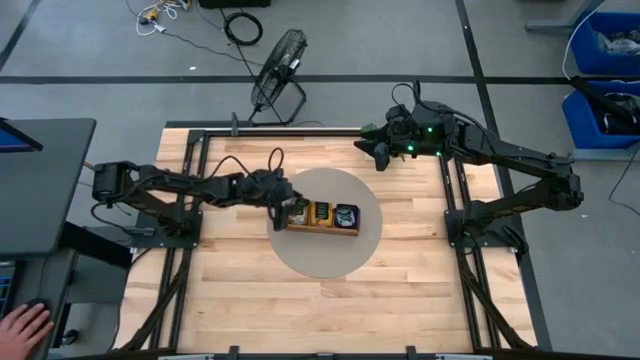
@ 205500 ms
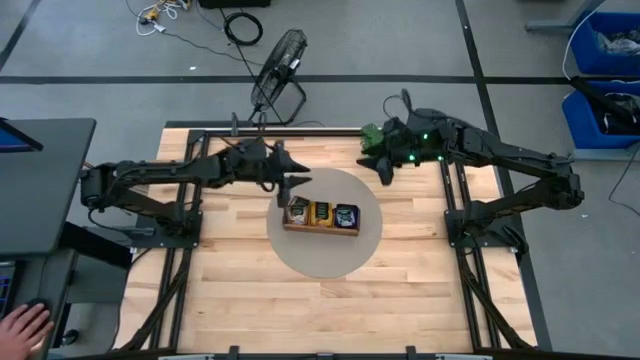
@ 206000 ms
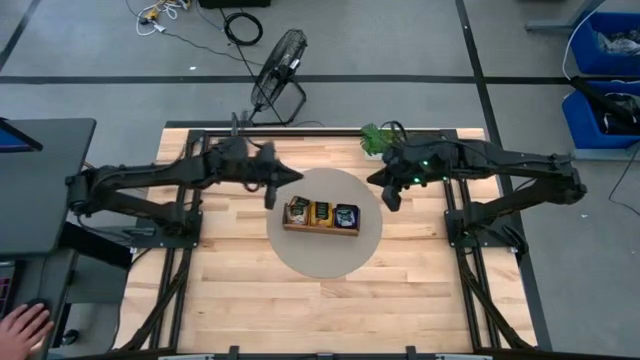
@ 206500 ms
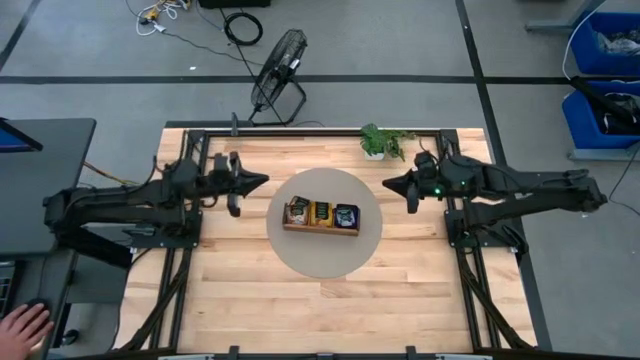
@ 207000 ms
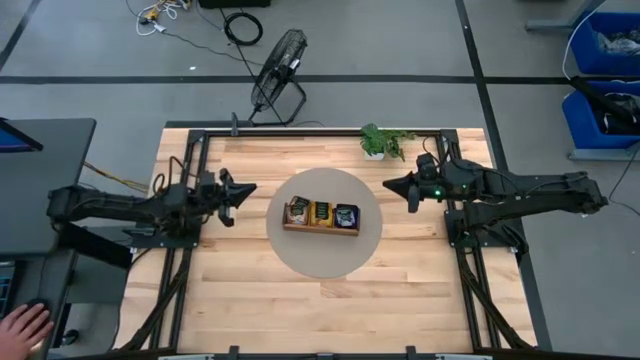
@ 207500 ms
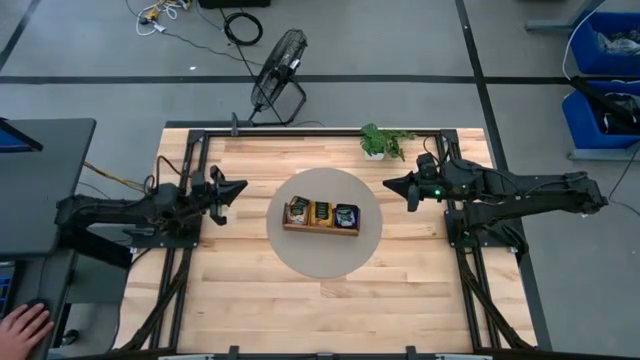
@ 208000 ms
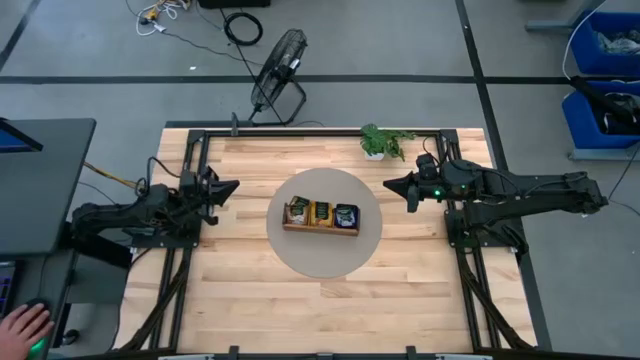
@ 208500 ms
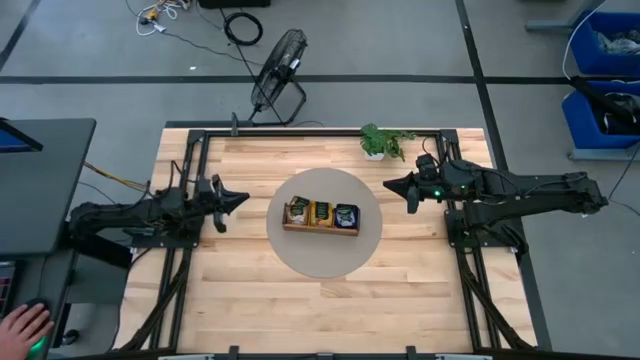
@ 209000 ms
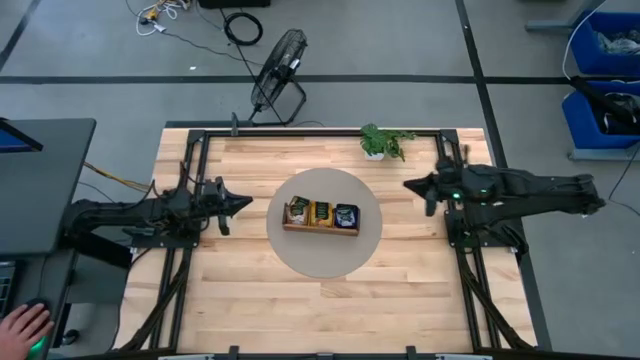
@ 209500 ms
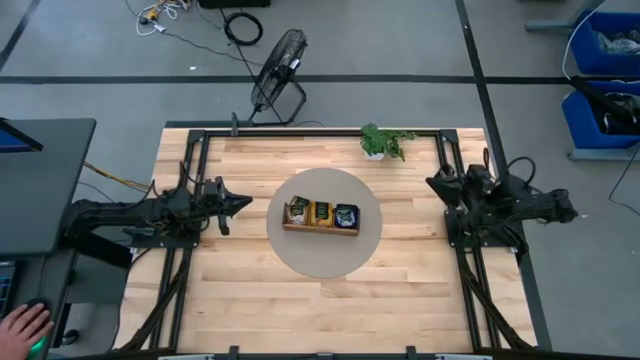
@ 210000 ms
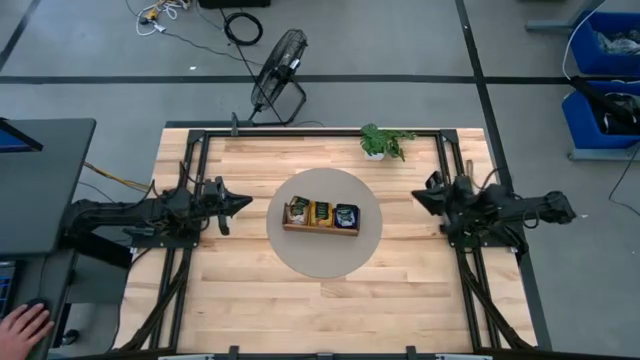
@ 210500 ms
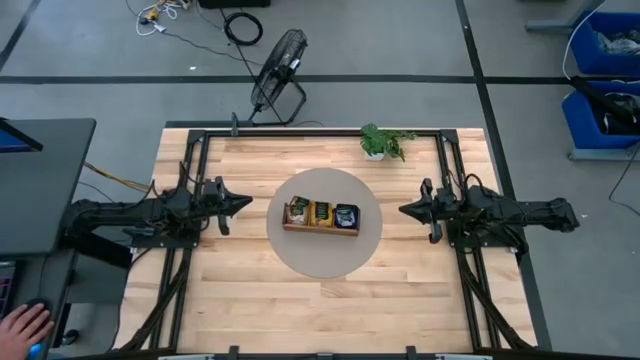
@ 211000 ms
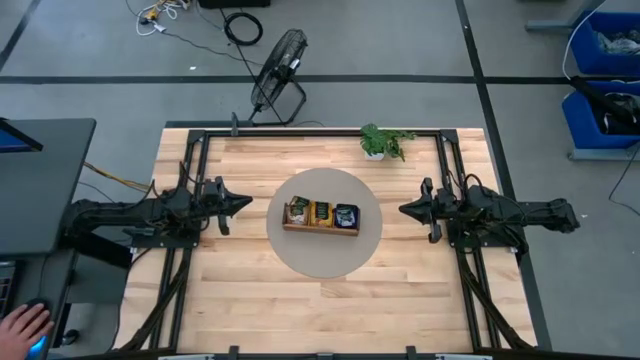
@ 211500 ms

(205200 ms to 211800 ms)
Task: Pick & Place Tea
Return to Home Position

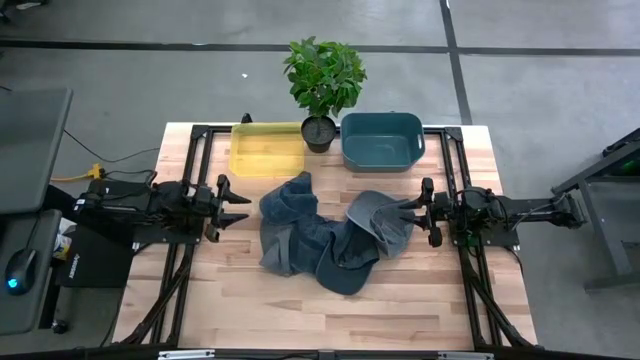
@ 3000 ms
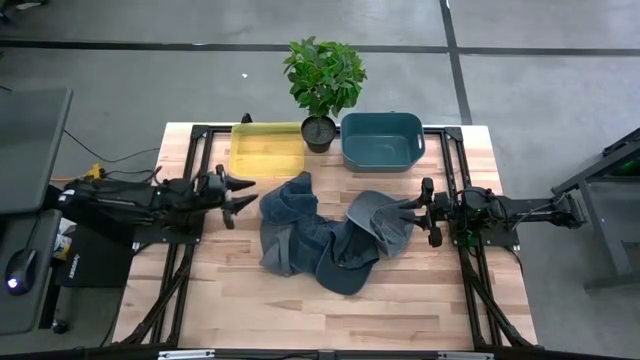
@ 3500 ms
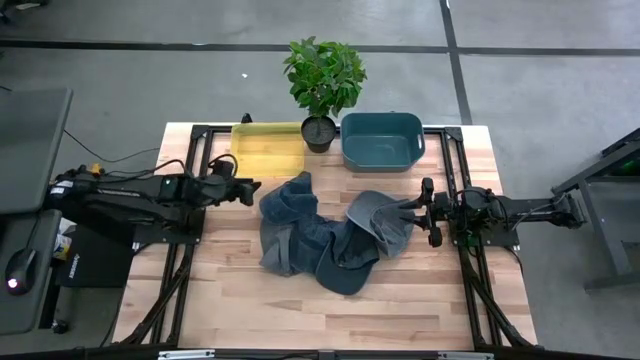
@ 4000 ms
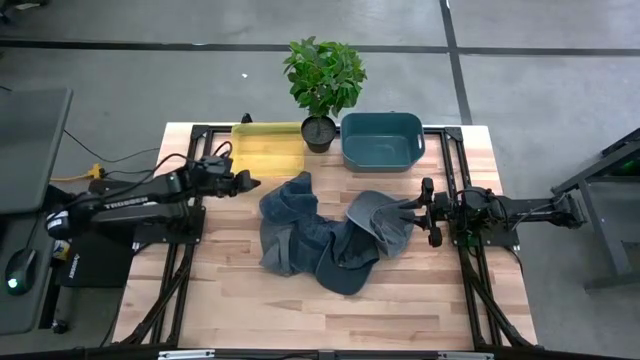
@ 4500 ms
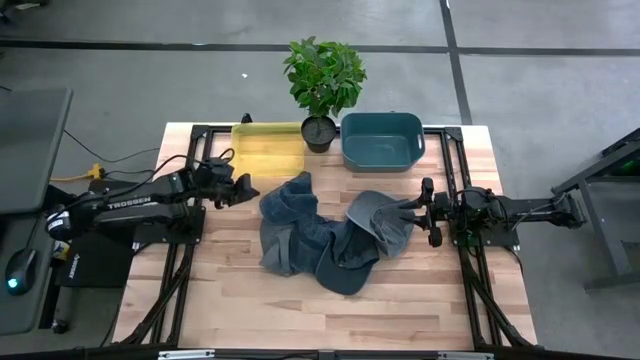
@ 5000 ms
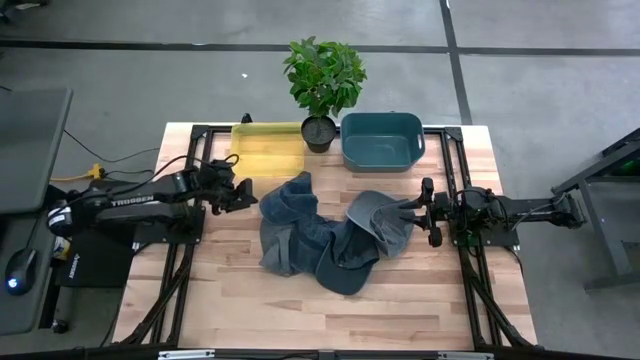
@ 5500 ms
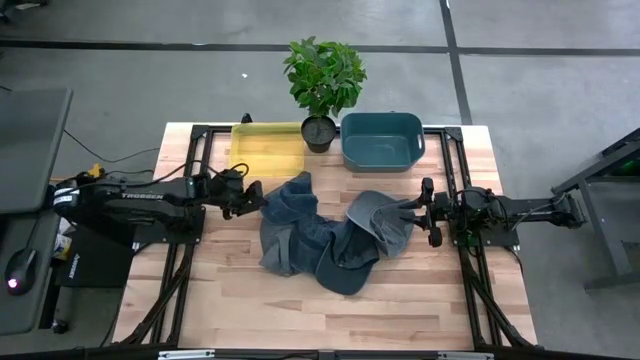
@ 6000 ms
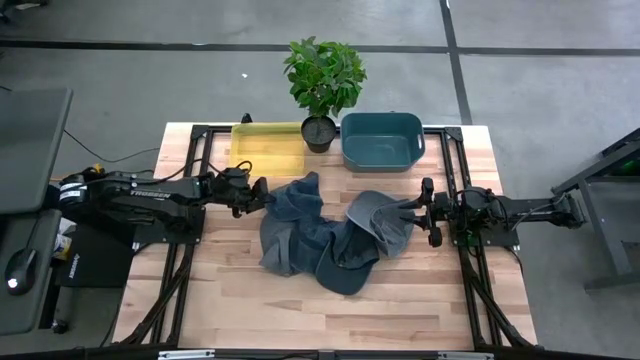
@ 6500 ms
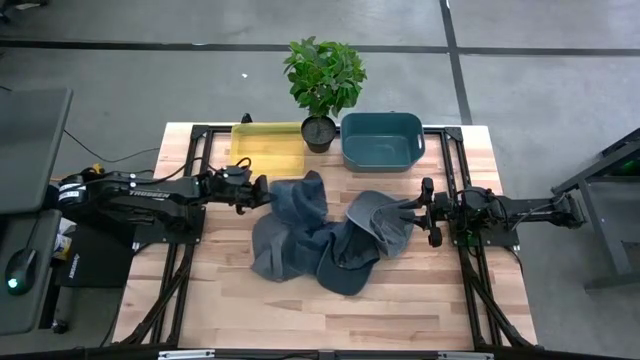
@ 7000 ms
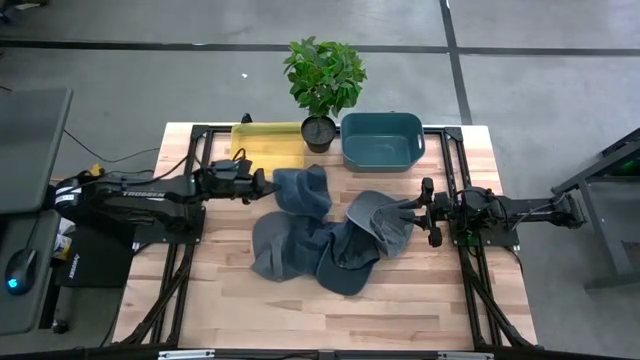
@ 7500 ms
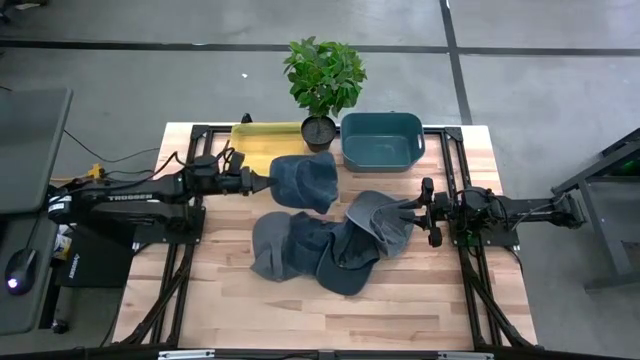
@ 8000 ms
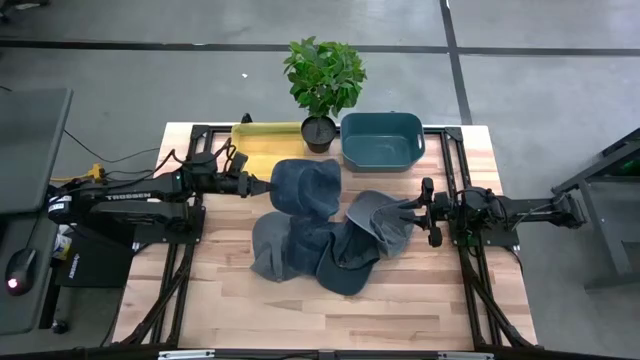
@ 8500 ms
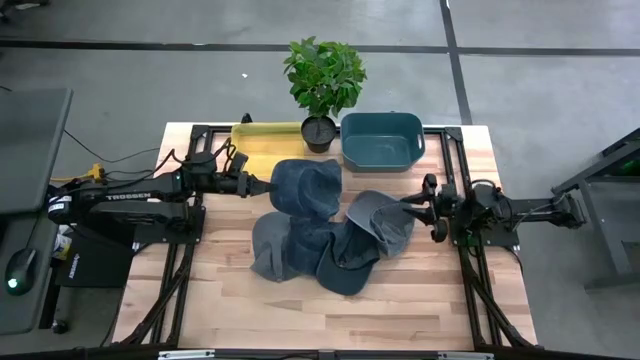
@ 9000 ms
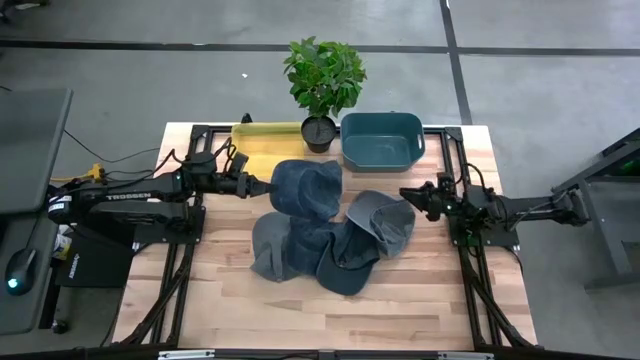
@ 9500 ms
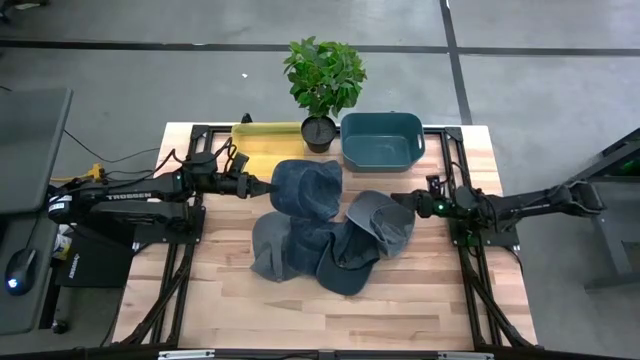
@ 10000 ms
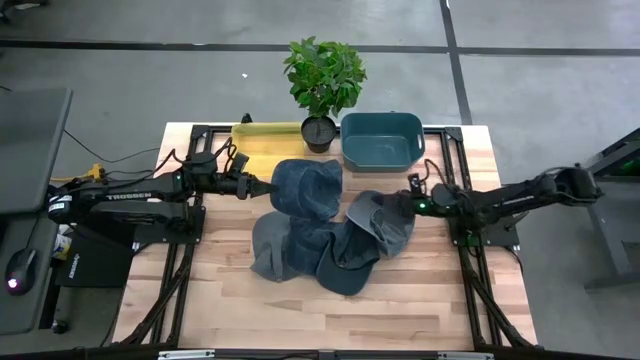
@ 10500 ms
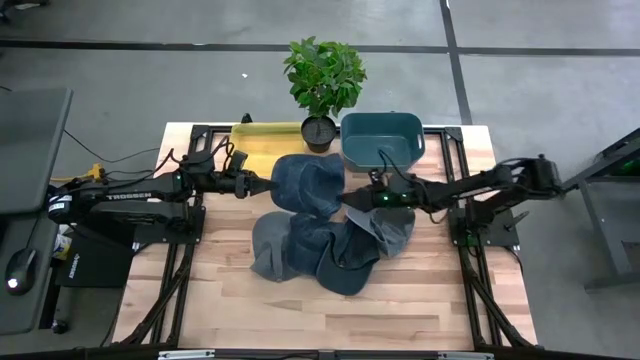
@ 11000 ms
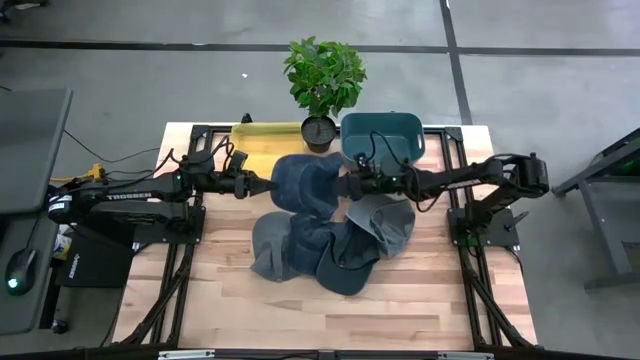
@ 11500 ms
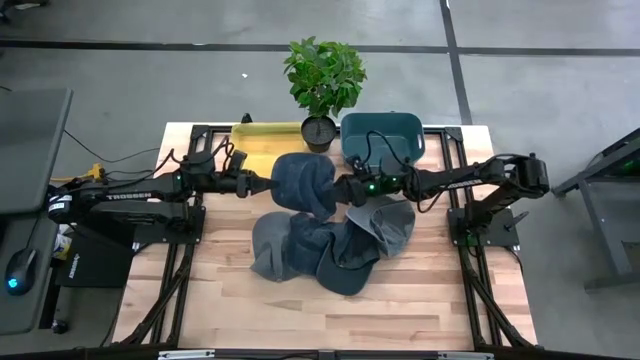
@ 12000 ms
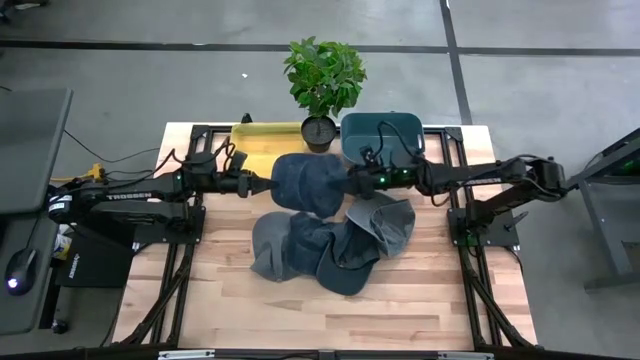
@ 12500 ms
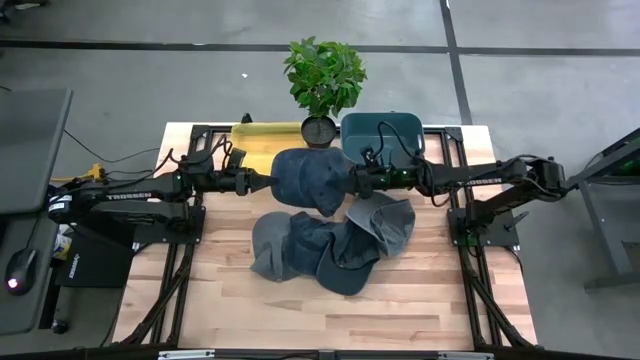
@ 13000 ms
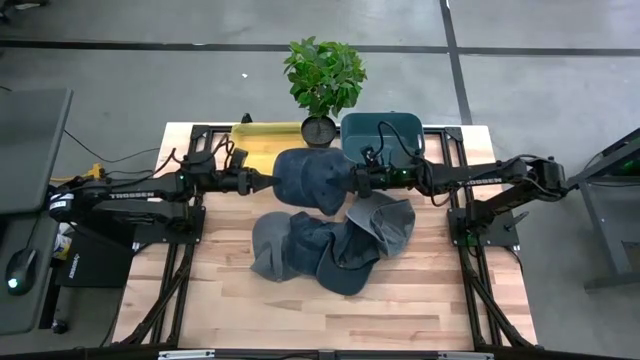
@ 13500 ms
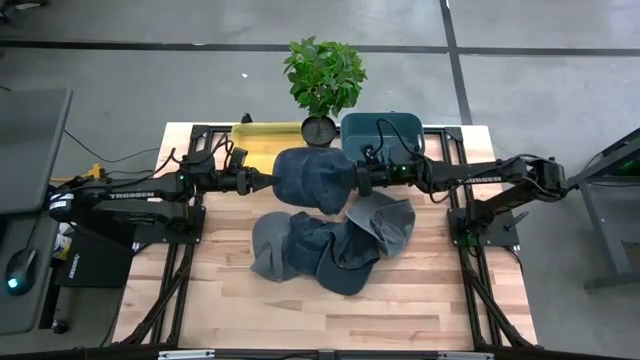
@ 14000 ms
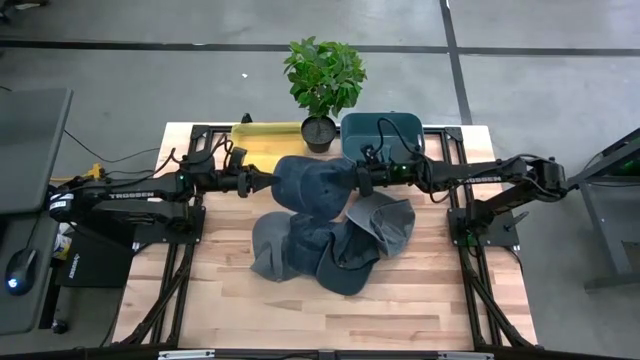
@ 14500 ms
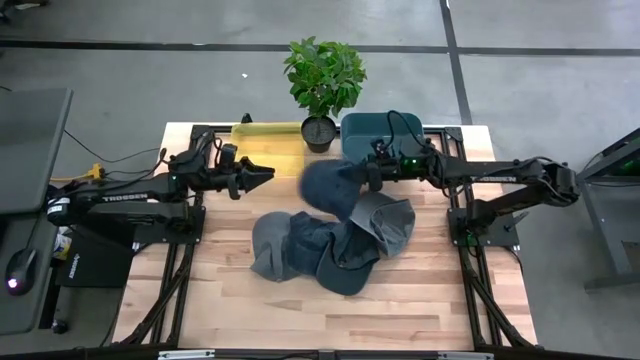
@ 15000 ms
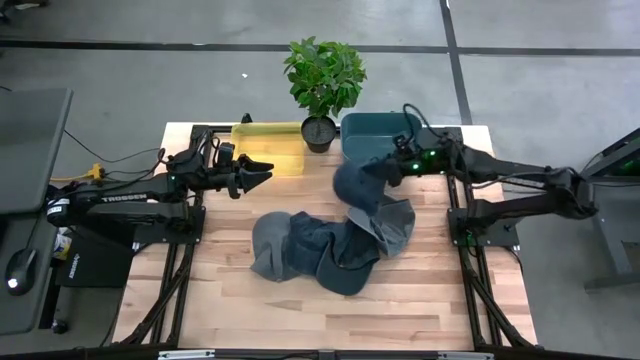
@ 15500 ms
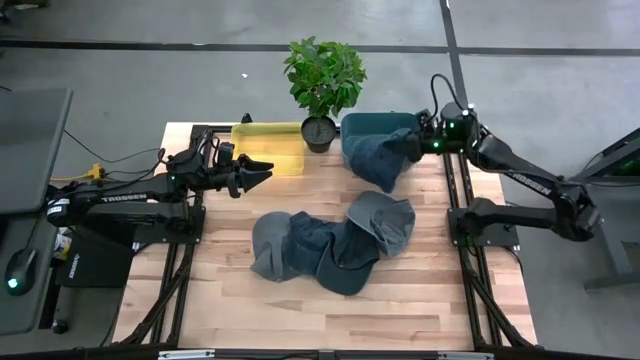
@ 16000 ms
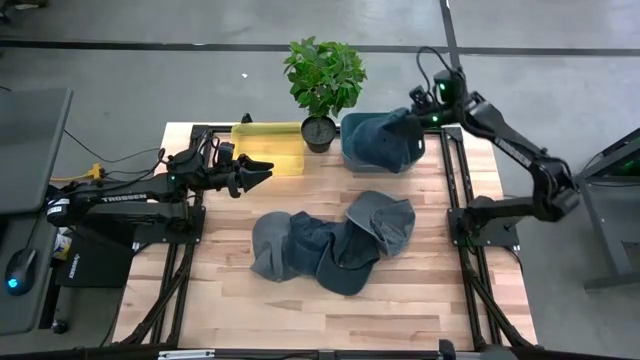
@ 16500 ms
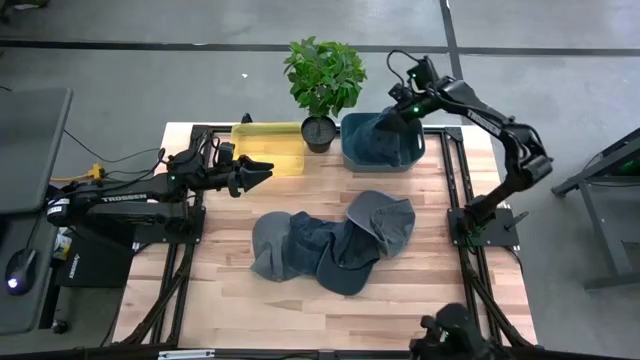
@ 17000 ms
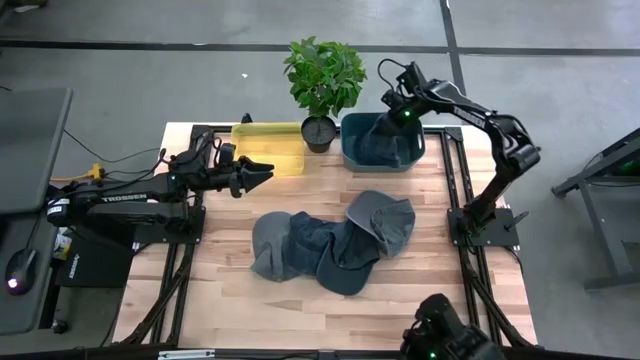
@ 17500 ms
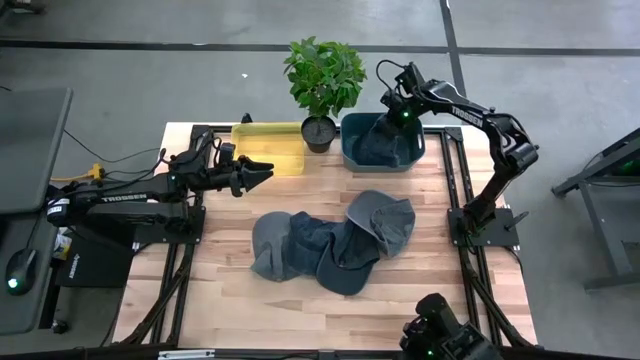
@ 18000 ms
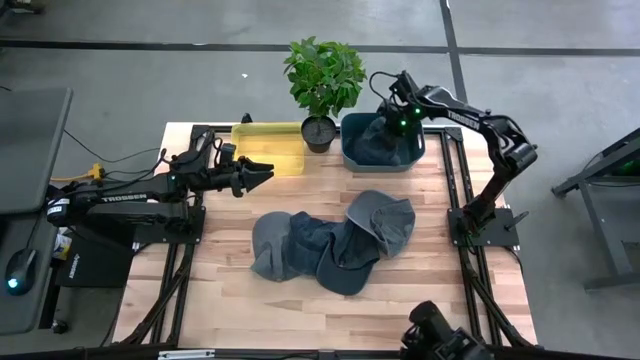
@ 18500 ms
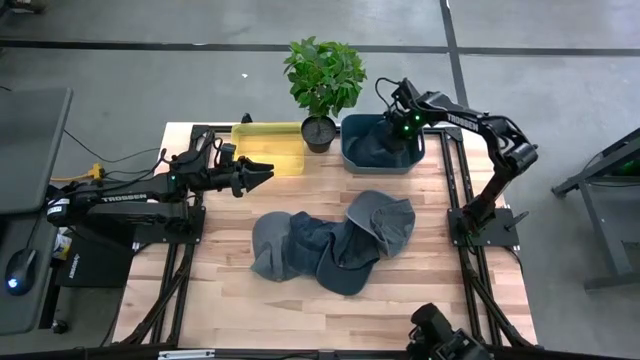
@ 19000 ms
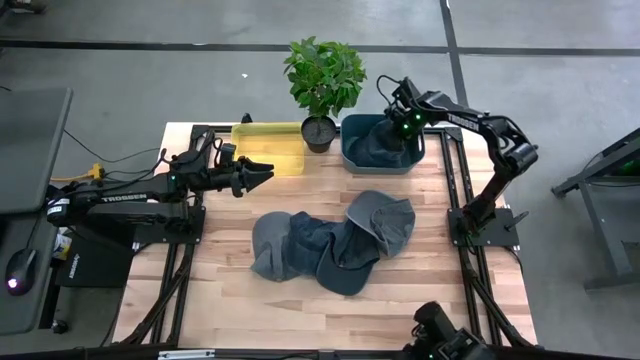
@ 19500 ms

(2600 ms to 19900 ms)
Task: Pick & Place hat
Put the top blue cap into the blue bin
